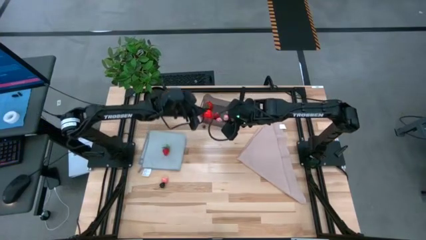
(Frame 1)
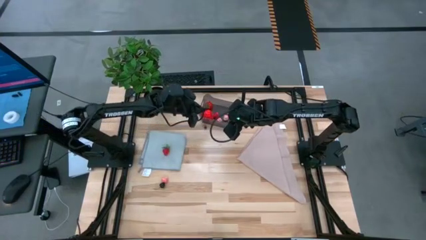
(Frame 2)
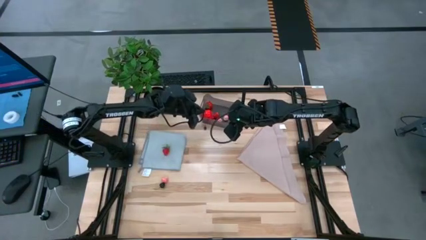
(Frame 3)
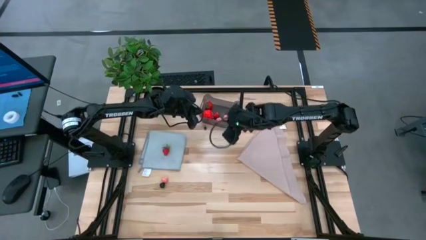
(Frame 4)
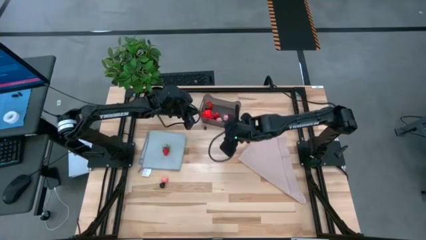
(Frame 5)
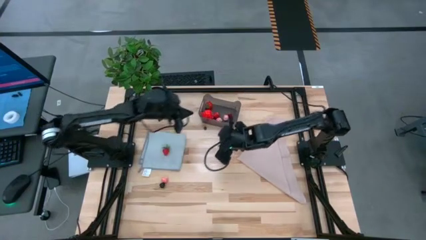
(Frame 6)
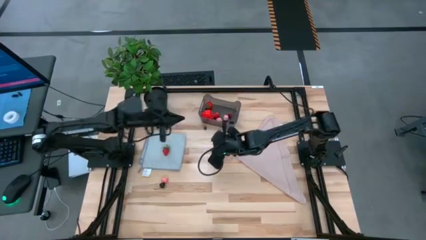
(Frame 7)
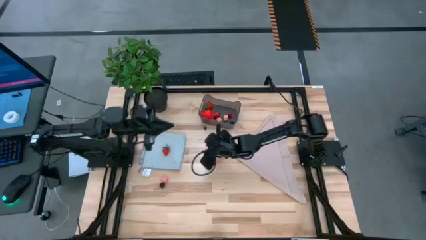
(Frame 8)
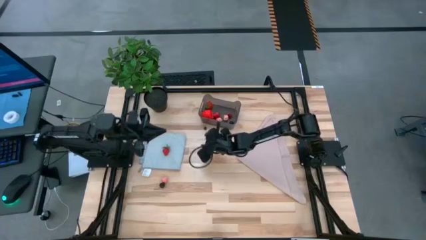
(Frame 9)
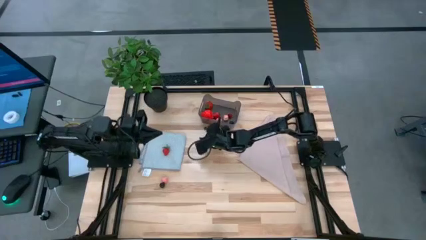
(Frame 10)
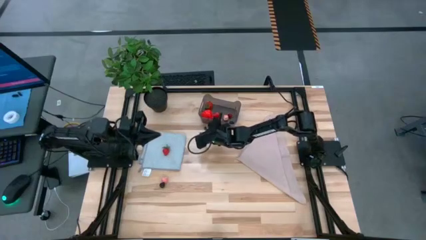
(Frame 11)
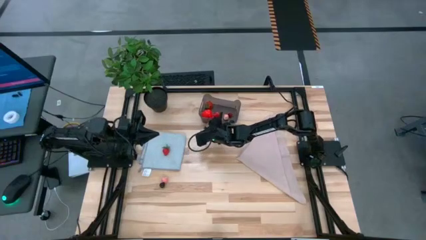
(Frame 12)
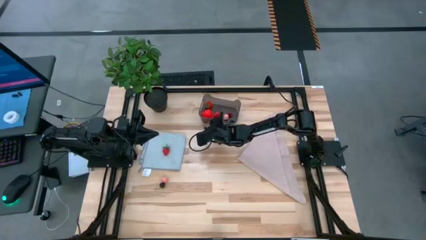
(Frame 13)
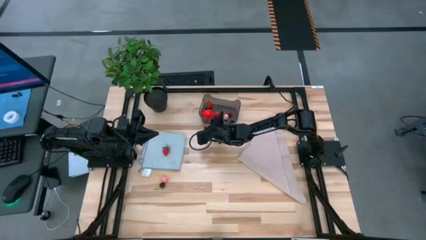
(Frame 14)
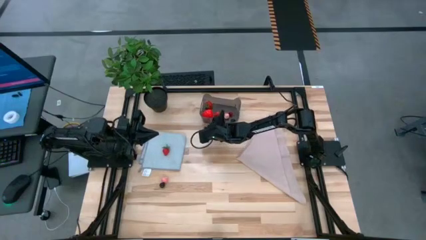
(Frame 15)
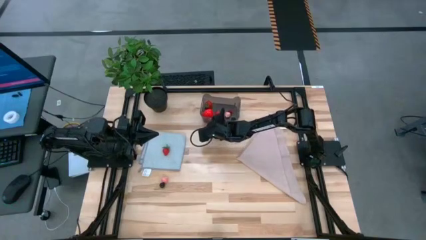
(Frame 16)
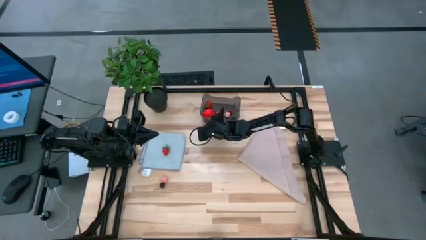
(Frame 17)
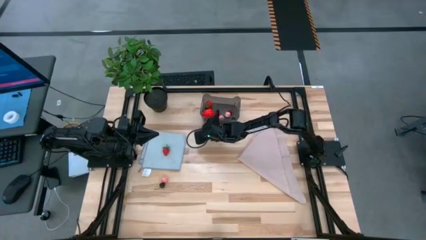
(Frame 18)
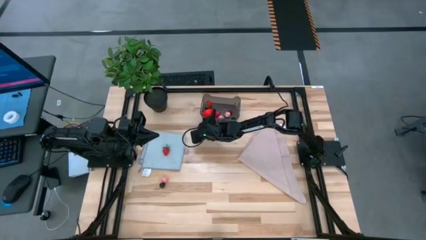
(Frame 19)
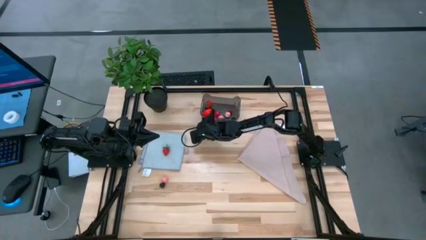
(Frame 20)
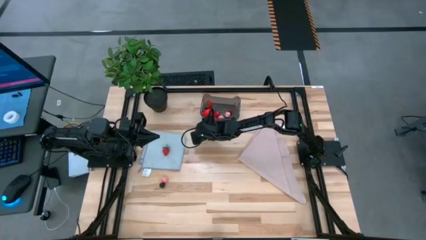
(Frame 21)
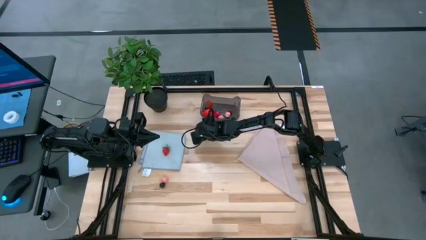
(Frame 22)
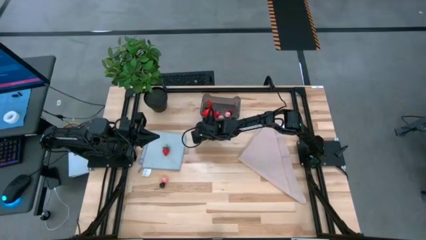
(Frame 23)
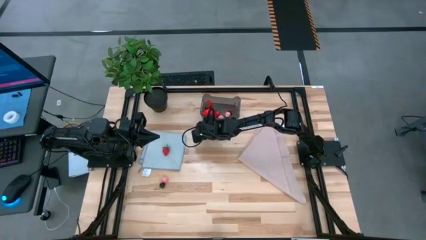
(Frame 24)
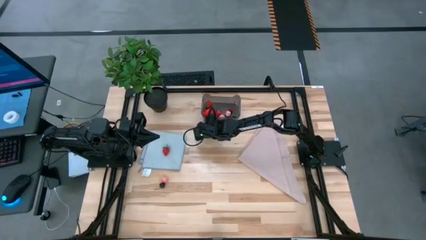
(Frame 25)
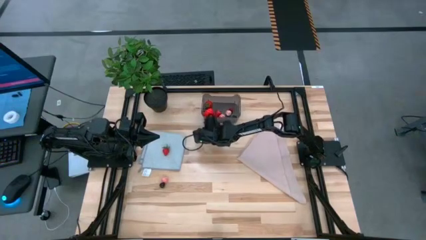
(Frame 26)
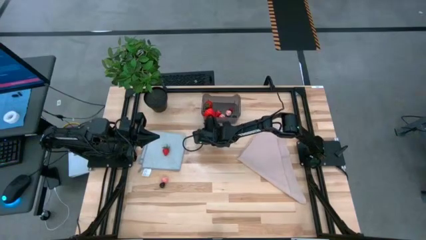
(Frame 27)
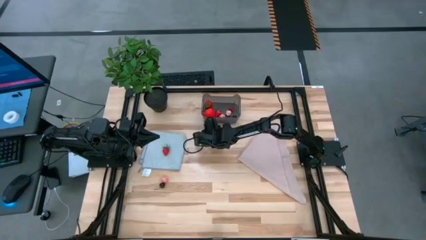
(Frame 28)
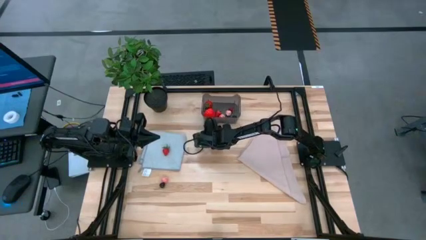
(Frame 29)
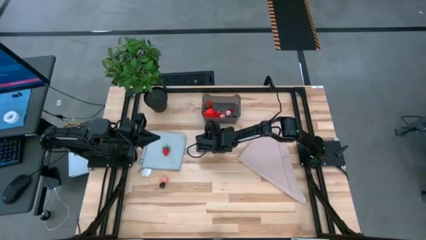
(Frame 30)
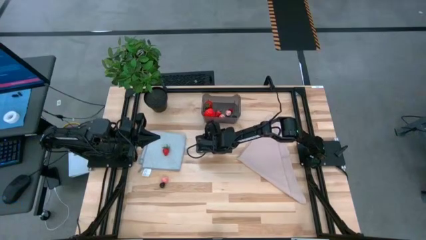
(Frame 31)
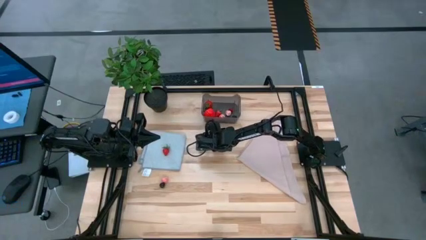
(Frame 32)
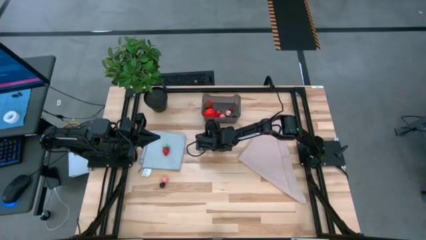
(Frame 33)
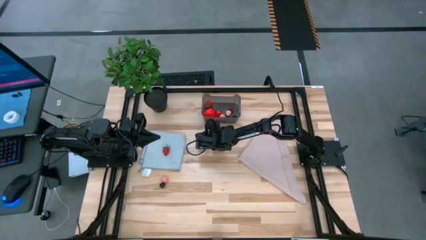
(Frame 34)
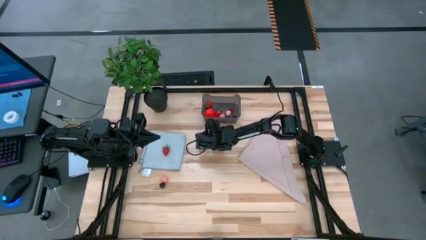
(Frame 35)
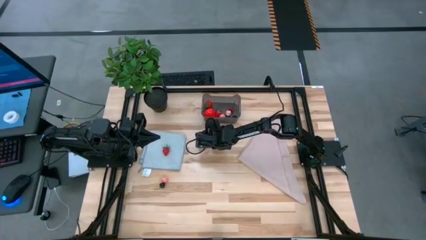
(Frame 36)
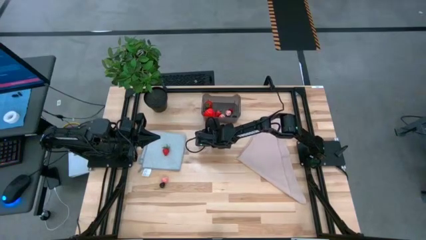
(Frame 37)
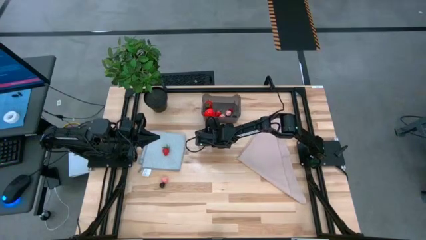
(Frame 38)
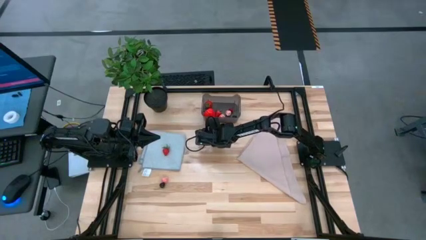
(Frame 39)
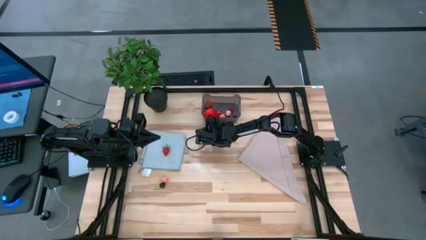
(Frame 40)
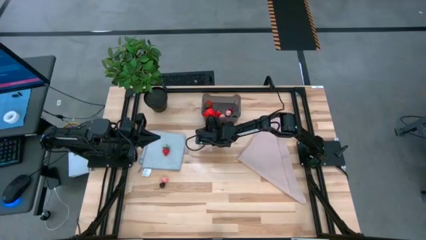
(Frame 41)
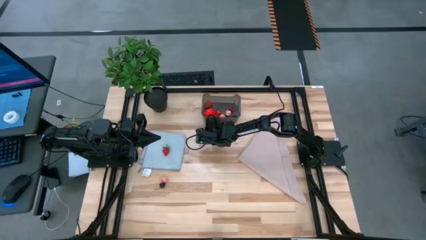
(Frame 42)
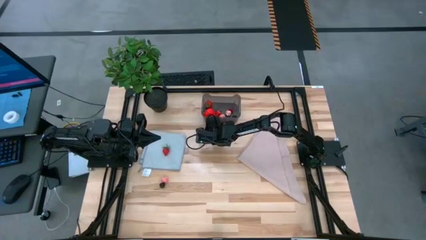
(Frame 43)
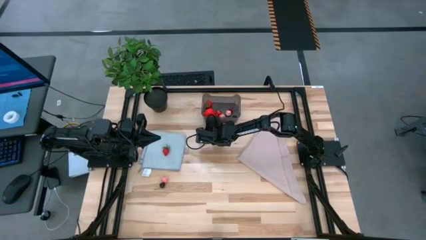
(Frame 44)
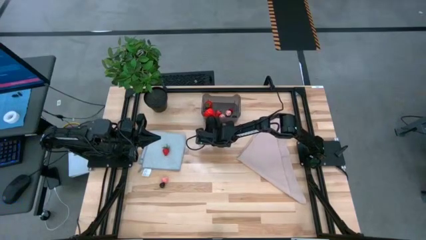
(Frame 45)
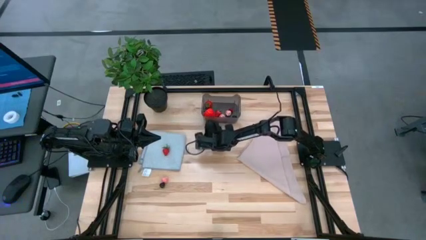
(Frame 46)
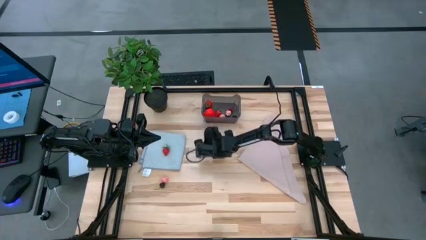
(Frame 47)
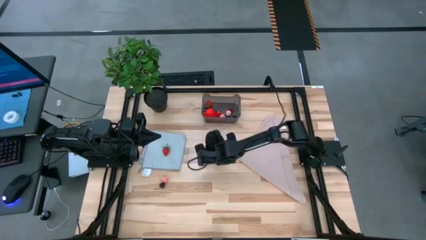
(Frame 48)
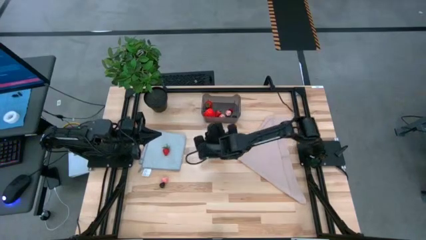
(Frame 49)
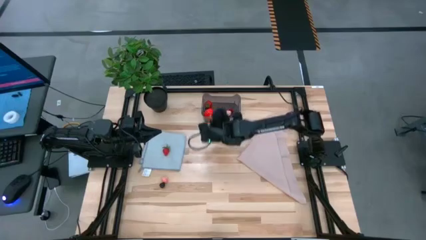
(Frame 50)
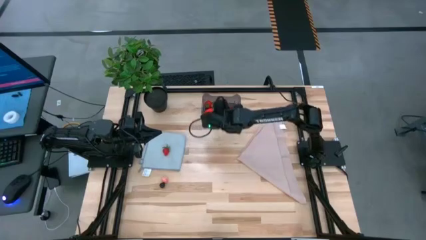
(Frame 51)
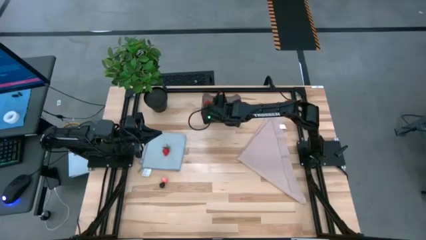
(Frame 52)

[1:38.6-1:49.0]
Task: Pick and placing Produce into tupperware
Put the blueberry into the black bin

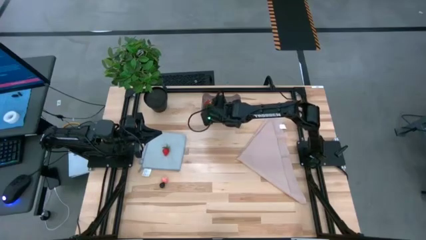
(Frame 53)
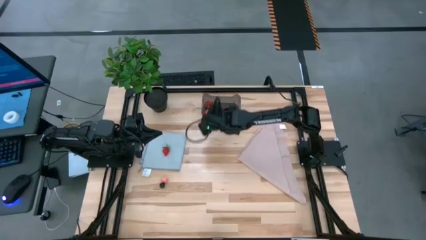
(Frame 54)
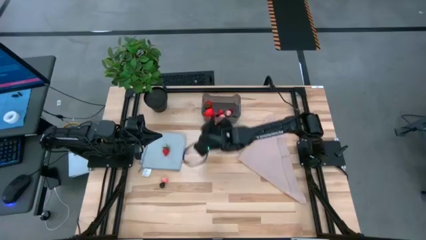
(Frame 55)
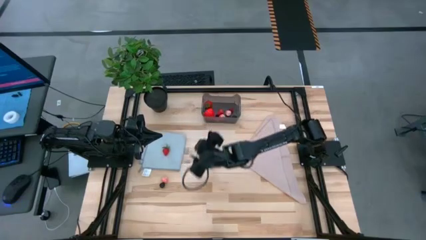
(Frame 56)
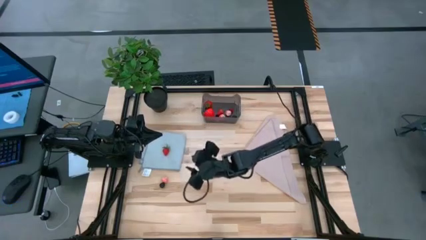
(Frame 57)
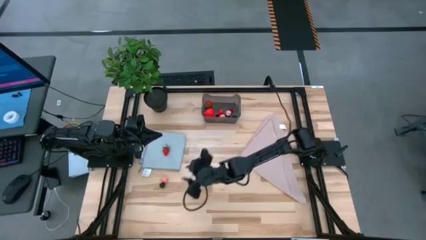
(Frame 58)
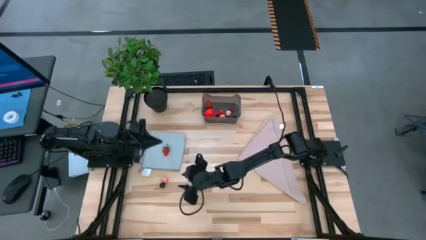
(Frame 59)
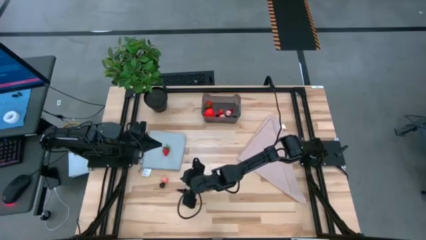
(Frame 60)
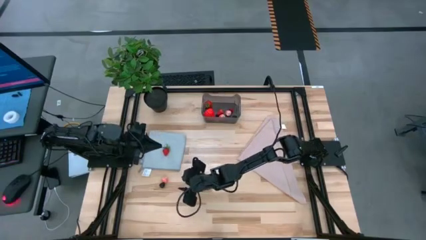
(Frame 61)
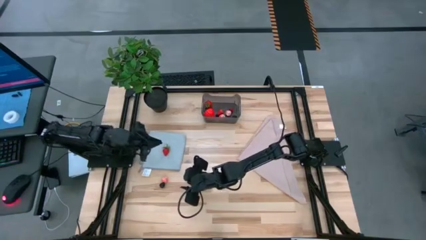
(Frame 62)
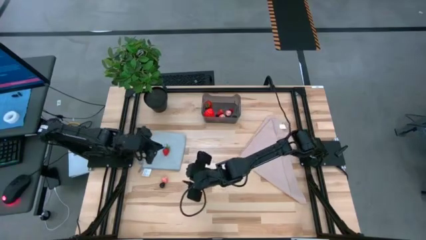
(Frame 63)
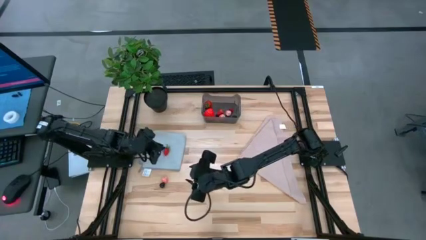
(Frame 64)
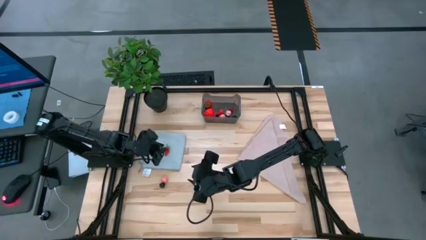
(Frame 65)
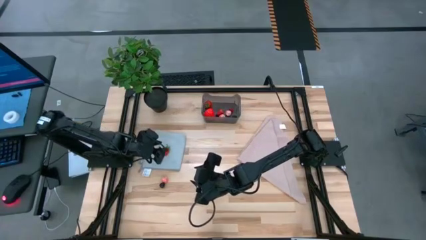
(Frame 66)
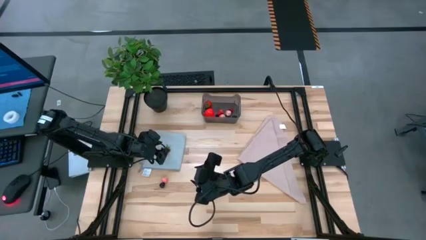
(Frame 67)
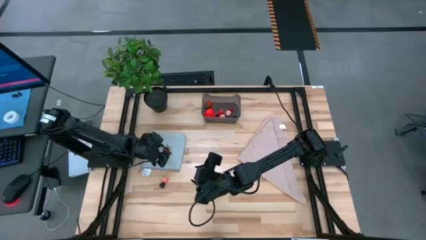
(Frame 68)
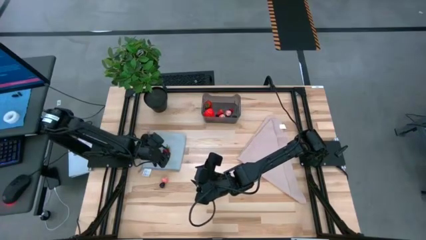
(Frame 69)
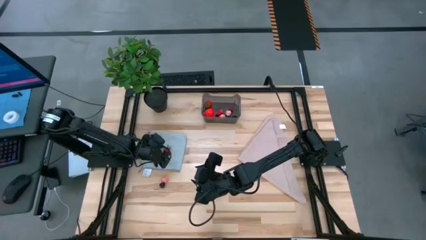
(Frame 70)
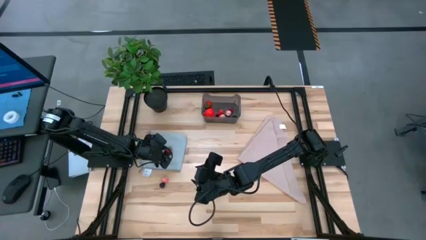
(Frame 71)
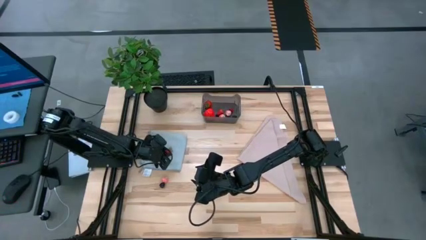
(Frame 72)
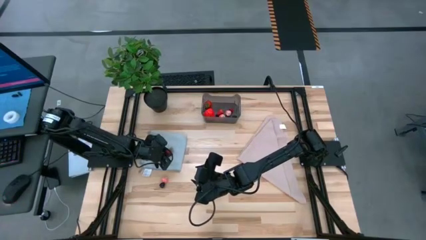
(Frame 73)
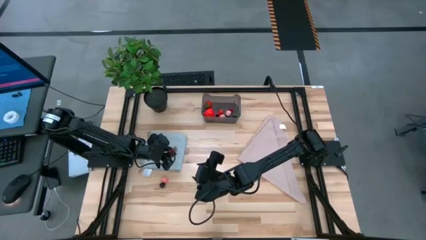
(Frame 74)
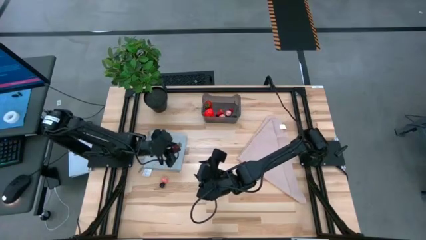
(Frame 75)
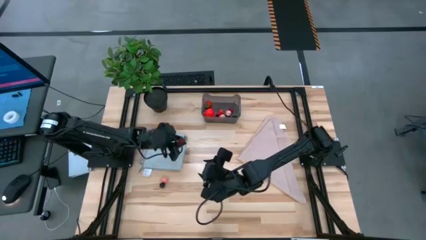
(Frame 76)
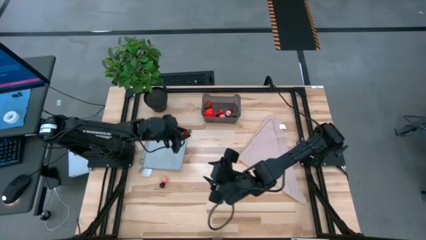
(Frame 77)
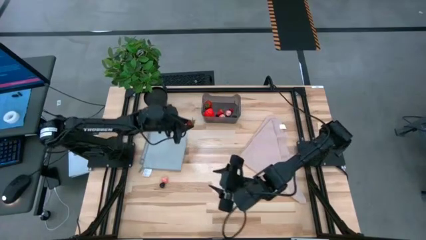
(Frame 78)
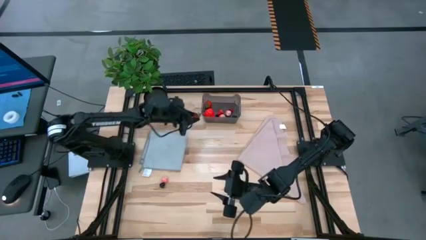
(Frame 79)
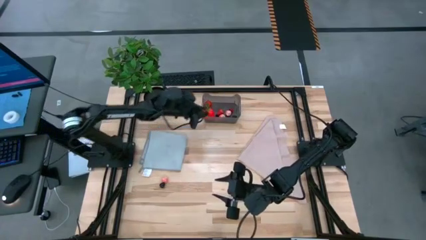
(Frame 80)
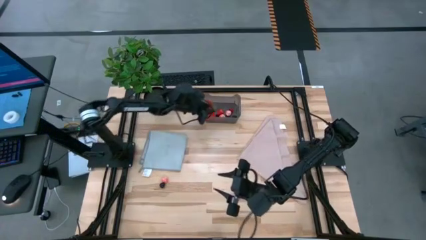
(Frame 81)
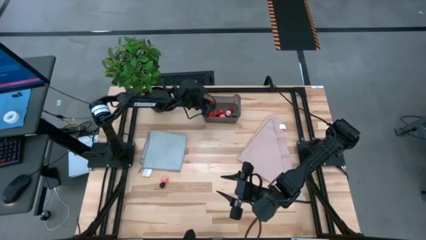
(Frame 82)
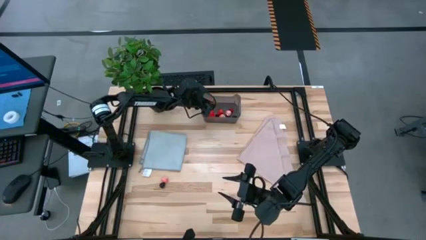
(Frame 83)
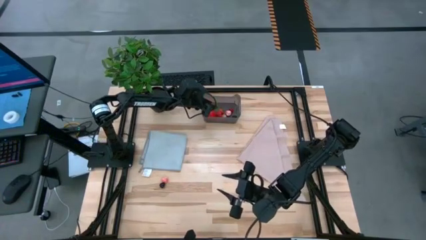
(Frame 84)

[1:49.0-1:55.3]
Put the strawberry into the black bin
